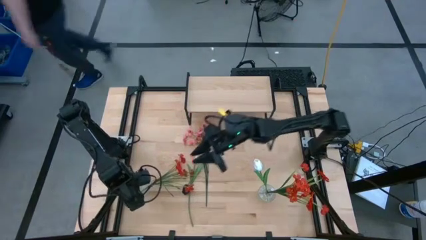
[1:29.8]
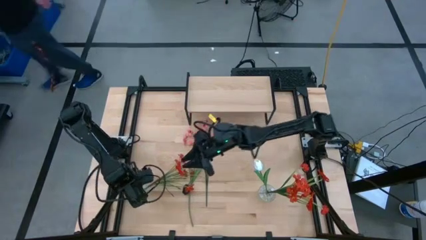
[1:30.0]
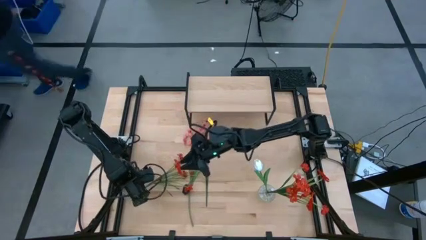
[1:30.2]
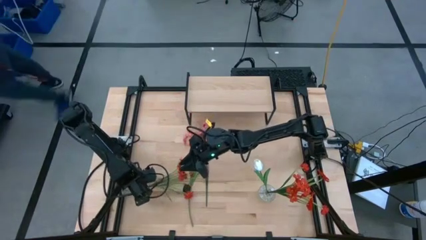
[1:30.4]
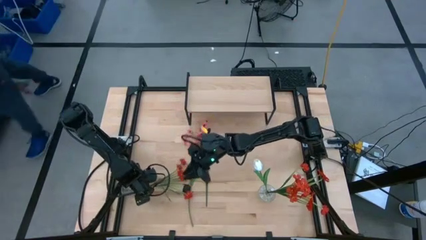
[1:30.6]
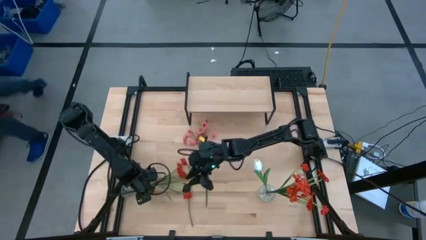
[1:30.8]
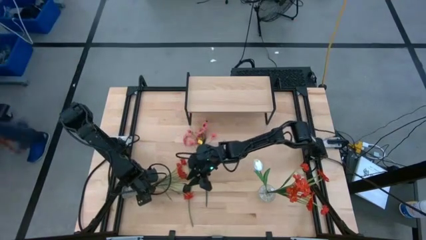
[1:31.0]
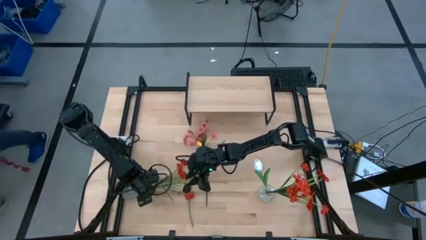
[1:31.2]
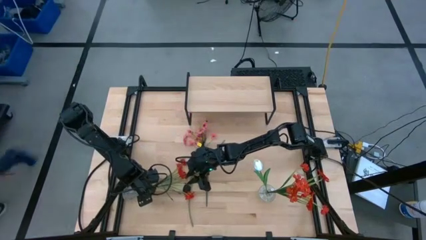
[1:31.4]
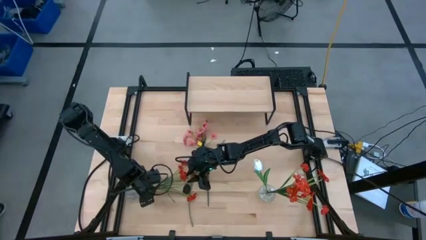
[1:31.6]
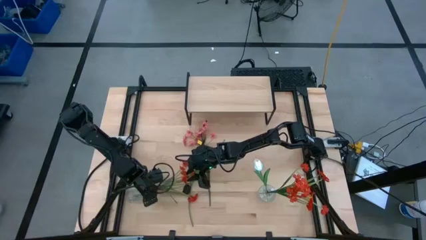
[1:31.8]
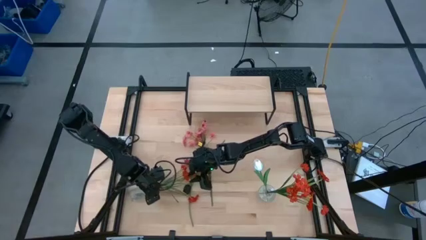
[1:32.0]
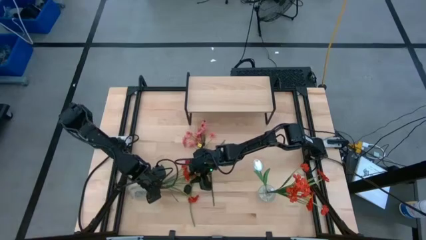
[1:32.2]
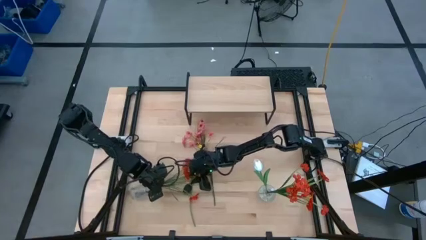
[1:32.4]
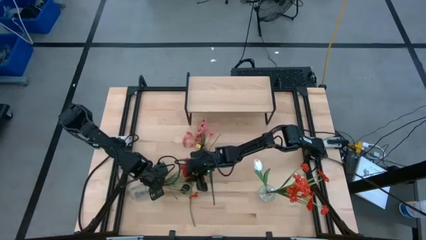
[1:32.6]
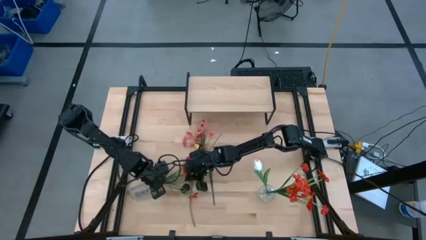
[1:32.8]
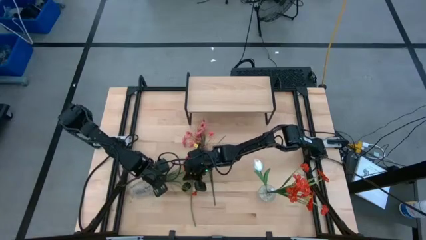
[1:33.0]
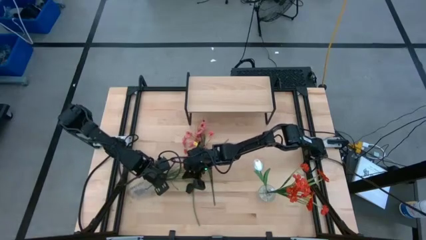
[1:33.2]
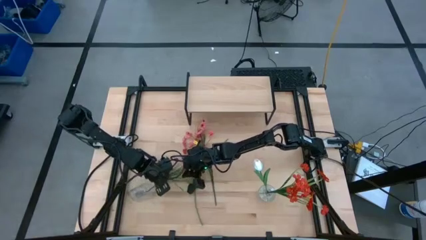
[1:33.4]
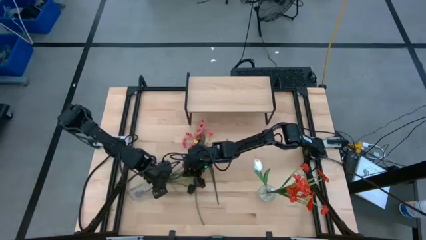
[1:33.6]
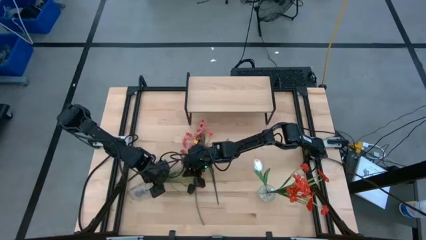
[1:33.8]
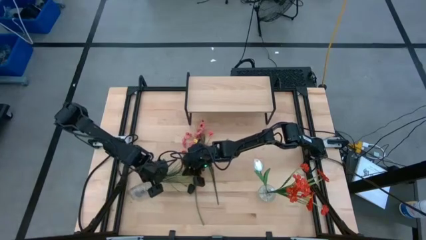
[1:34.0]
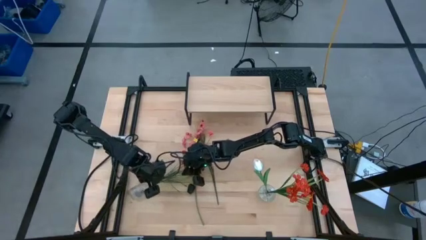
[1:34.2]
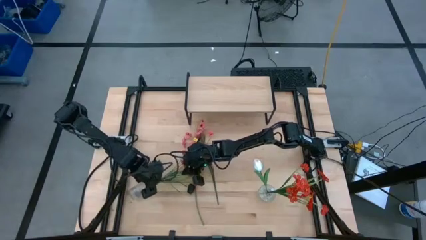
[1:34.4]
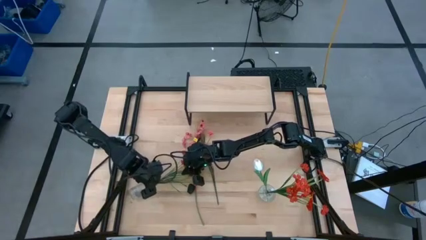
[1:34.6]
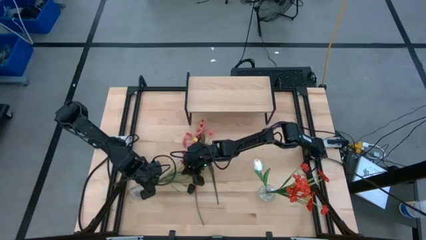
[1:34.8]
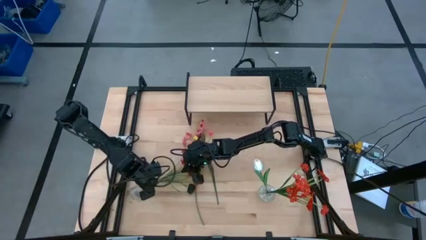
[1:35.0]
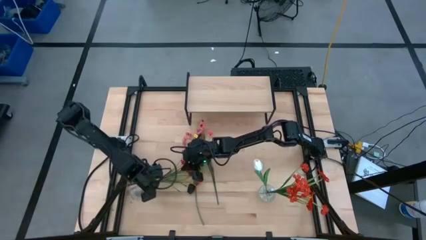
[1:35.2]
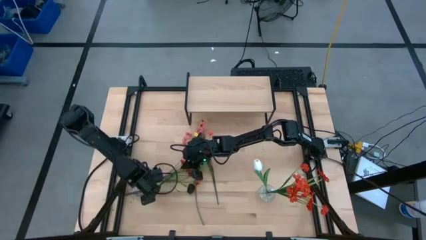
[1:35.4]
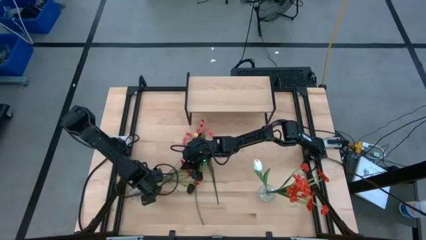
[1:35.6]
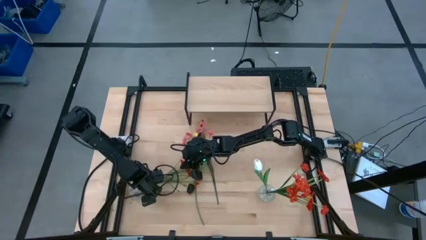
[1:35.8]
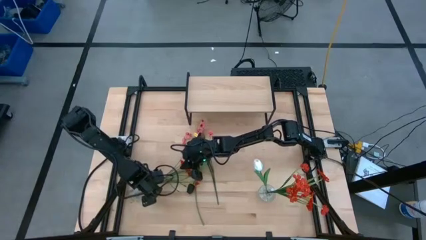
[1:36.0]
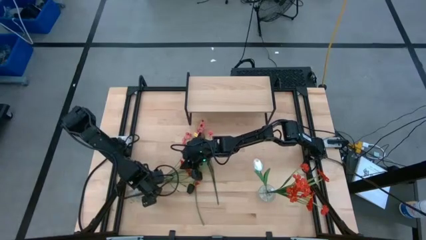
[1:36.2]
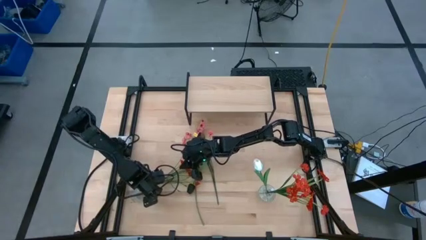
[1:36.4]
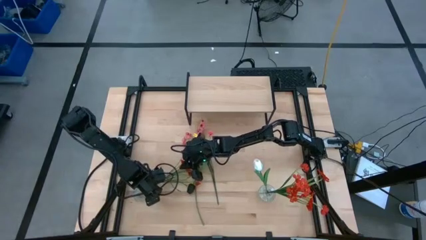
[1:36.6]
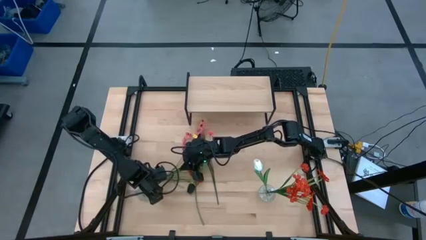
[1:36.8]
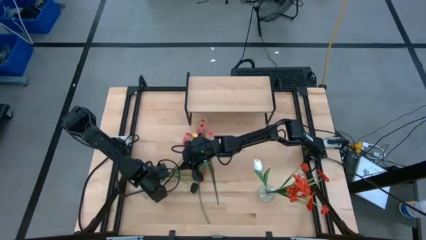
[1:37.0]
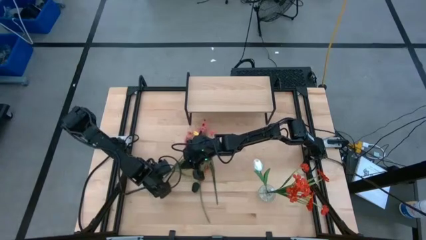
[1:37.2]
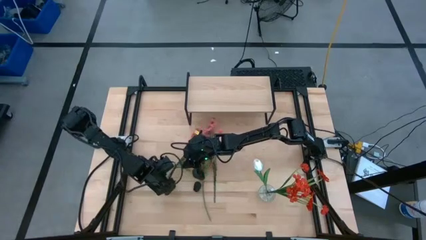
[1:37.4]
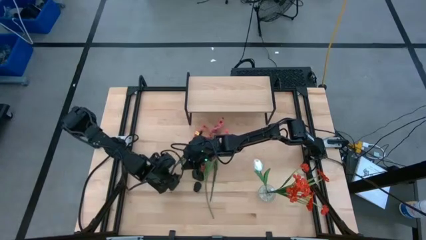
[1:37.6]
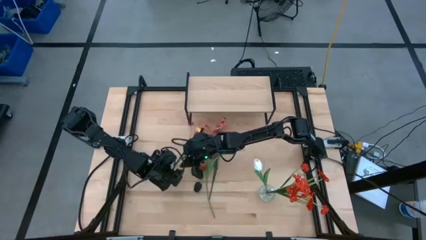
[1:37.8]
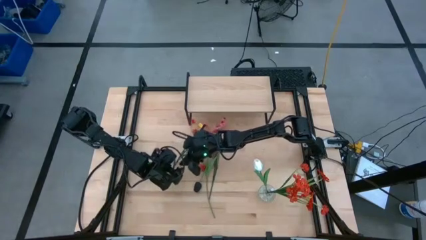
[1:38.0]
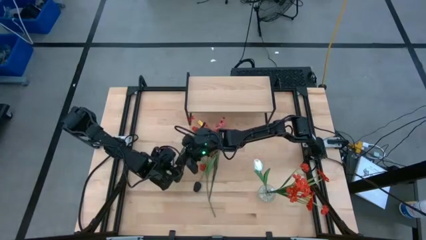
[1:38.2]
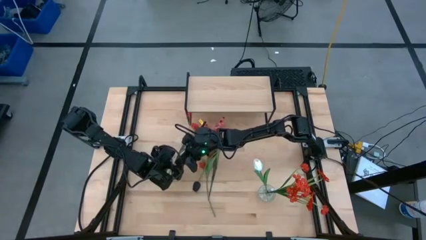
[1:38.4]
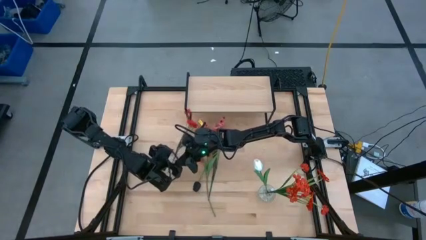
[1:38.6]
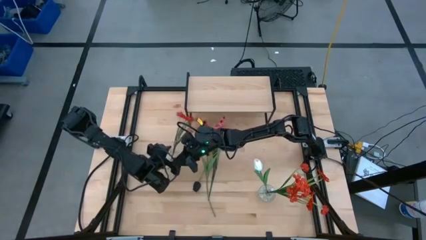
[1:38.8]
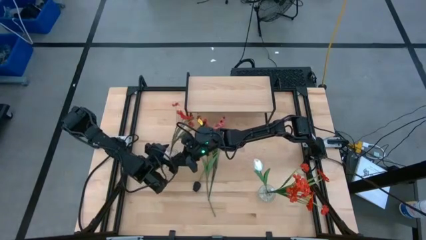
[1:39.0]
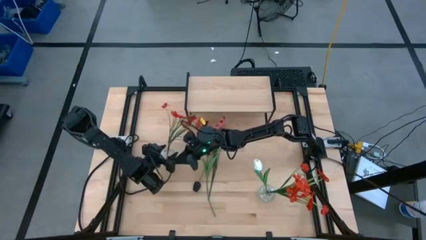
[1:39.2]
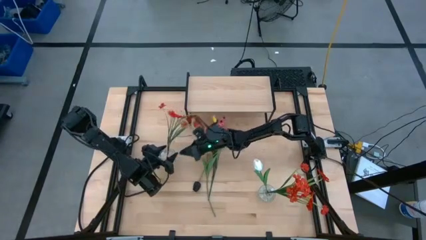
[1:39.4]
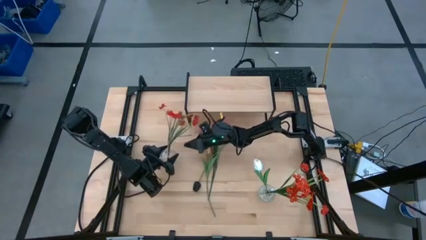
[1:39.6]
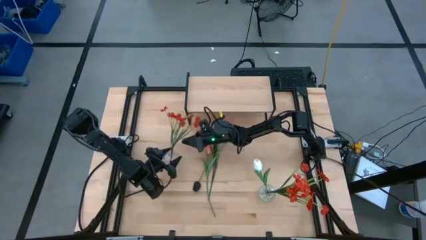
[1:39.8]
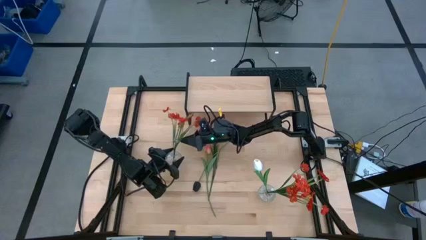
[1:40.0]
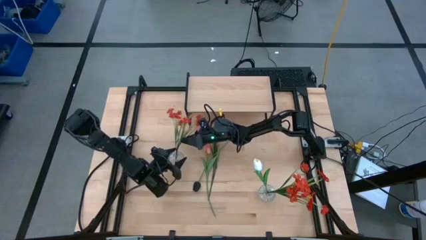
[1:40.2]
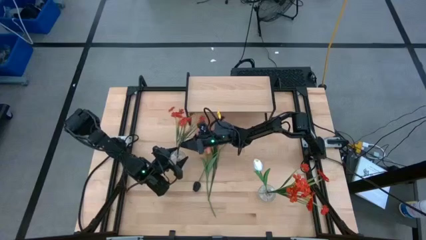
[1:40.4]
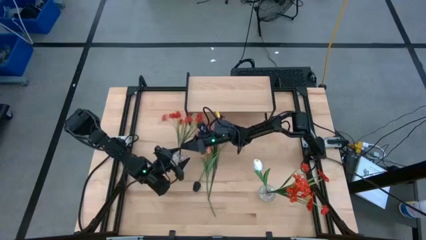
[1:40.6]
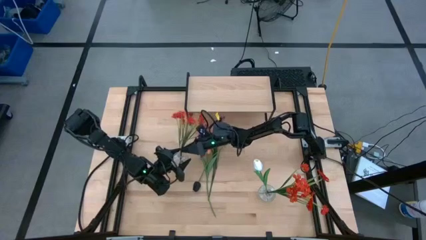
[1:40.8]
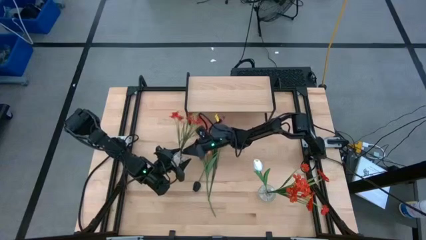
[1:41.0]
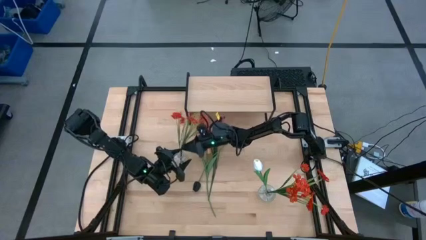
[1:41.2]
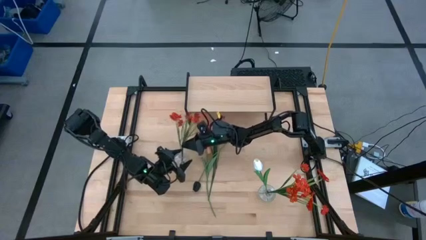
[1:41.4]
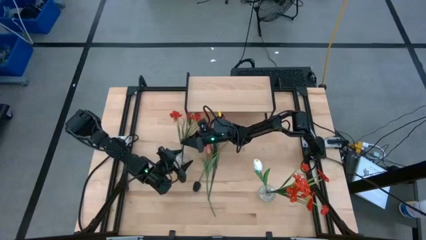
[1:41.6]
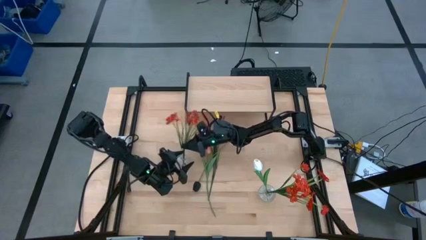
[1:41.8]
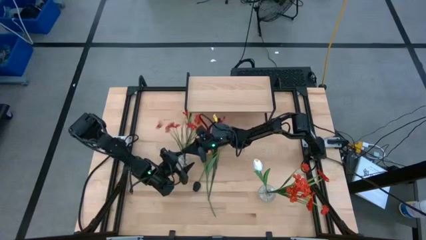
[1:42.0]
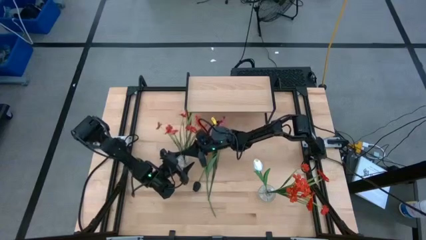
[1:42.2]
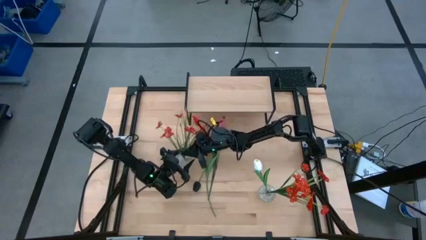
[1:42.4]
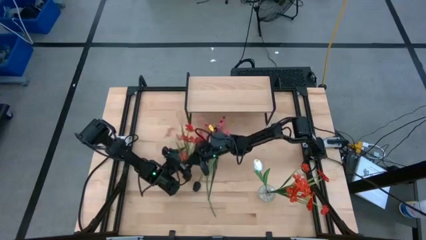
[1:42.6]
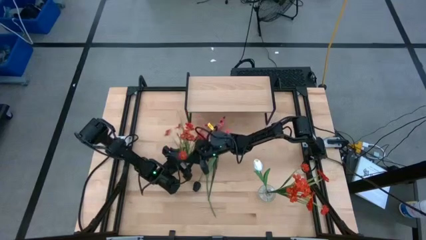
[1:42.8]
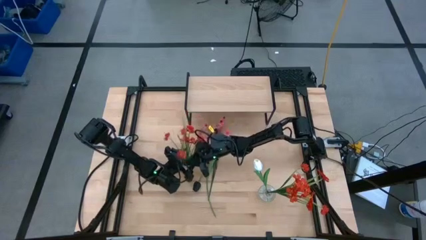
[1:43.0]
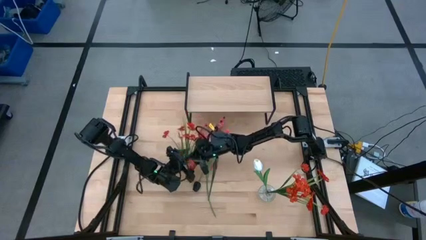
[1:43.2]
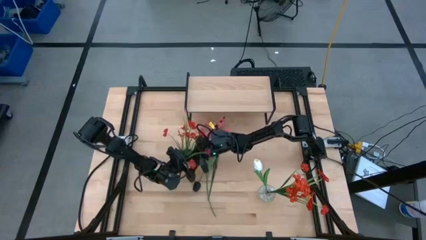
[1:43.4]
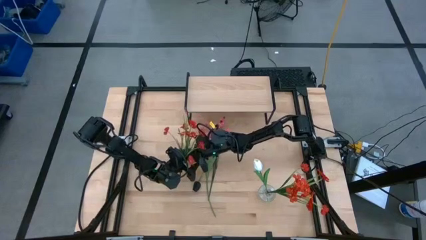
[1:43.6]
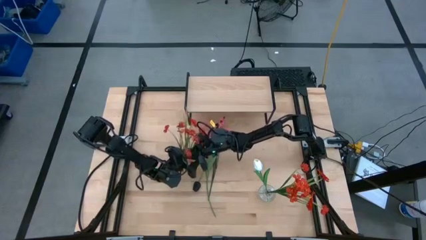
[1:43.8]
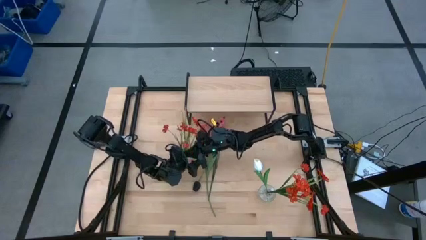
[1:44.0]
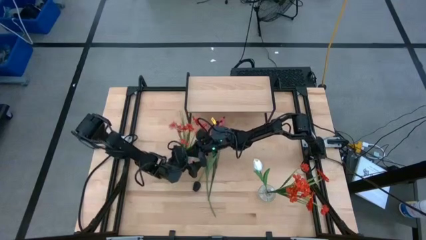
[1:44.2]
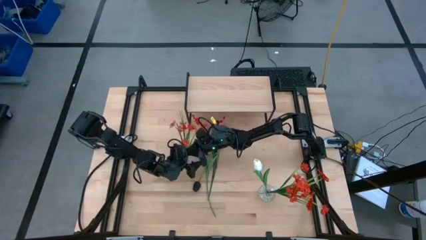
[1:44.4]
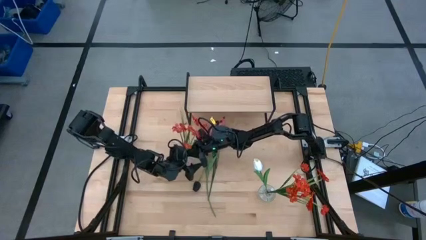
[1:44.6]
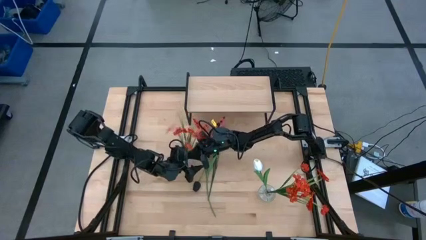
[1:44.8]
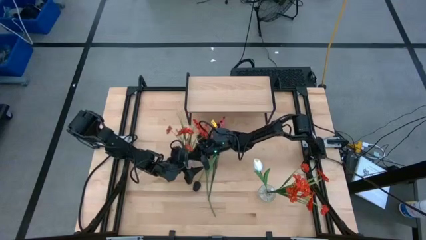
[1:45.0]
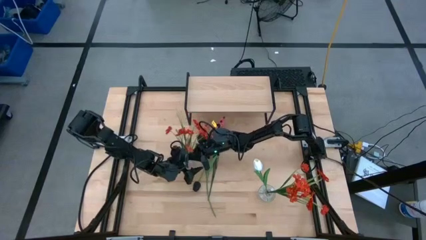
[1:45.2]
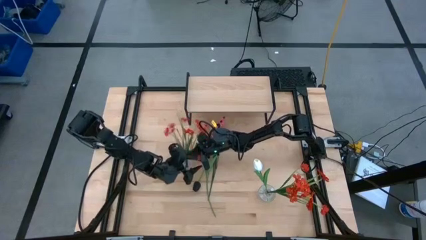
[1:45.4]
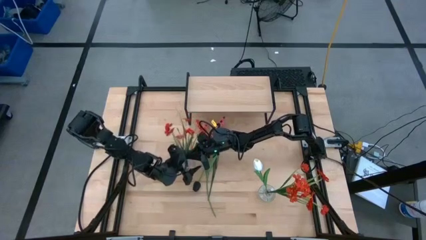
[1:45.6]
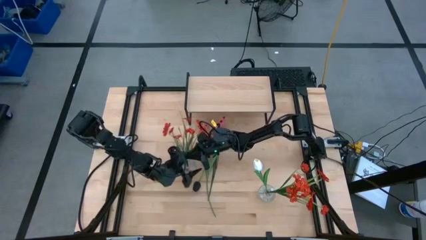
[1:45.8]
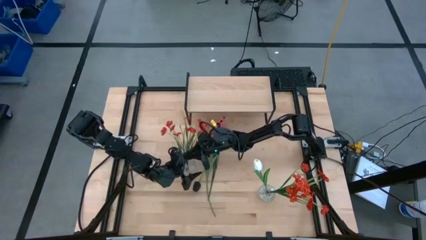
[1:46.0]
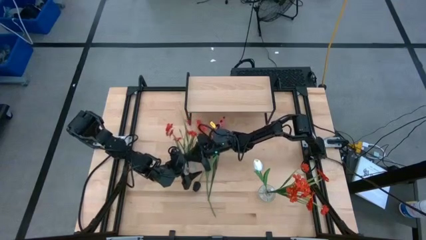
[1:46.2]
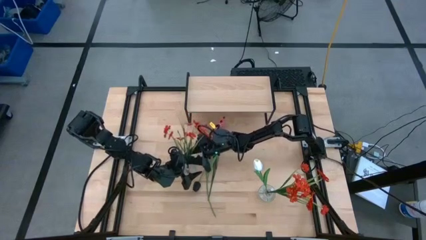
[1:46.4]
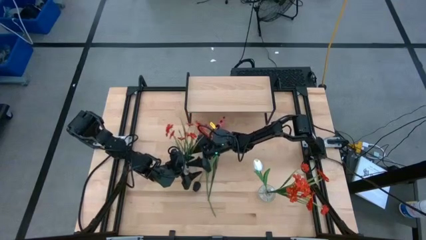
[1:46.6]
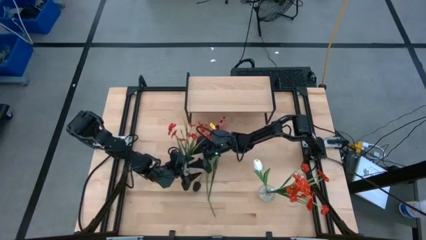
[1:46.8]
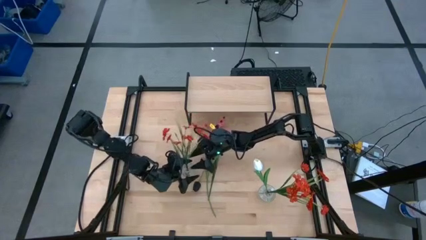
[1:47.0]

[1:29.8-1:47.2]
Task: Pick and place flowers into a vace then onto a shelf
Put the orange flowers into the left transparent vase
